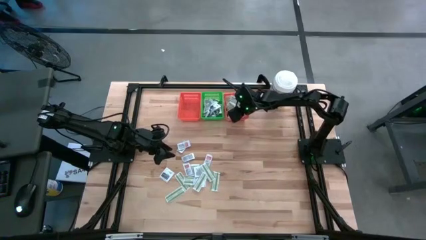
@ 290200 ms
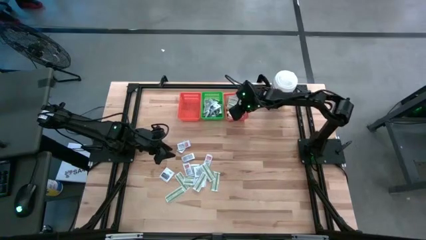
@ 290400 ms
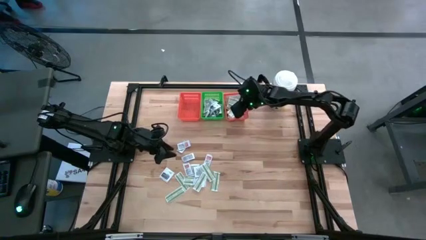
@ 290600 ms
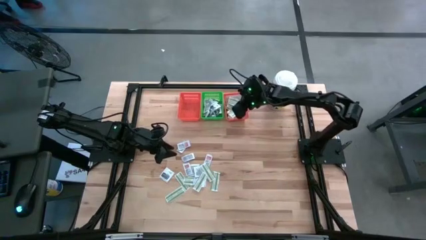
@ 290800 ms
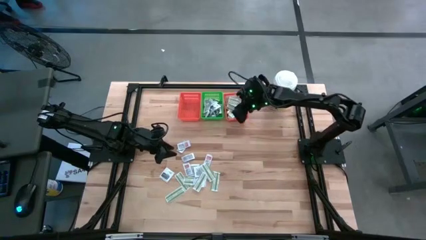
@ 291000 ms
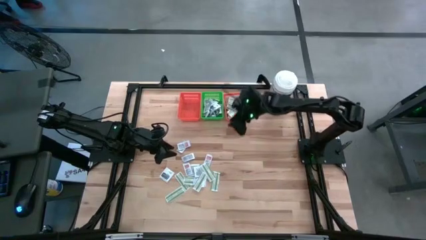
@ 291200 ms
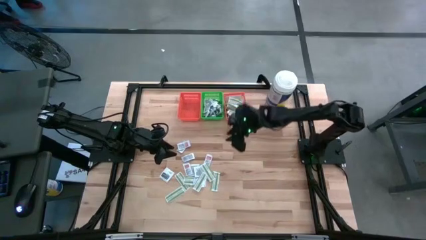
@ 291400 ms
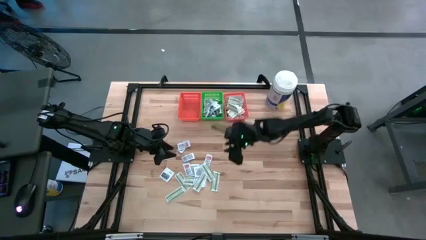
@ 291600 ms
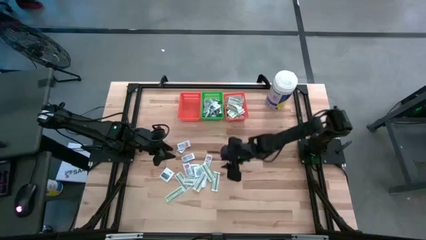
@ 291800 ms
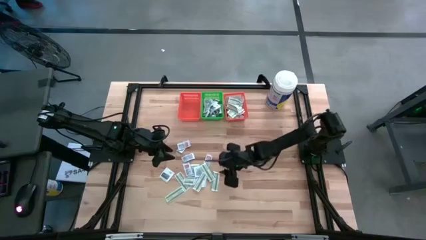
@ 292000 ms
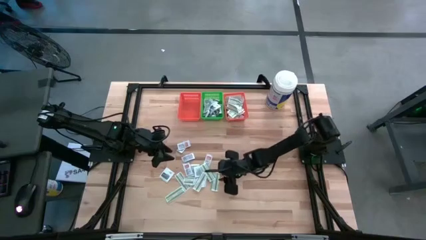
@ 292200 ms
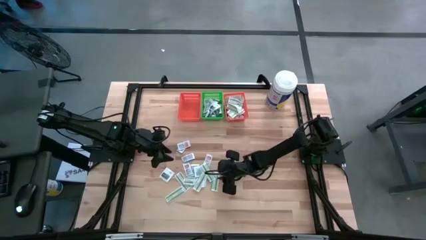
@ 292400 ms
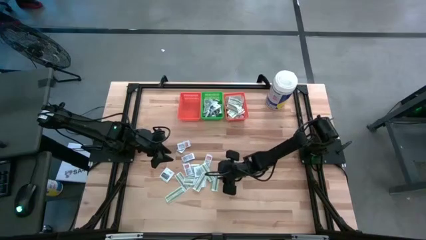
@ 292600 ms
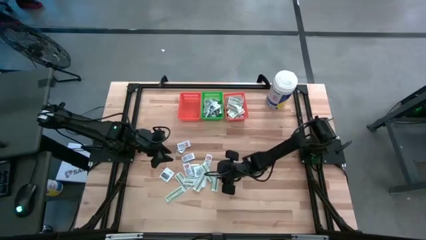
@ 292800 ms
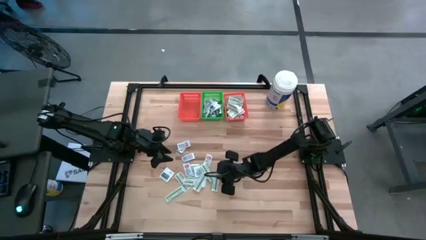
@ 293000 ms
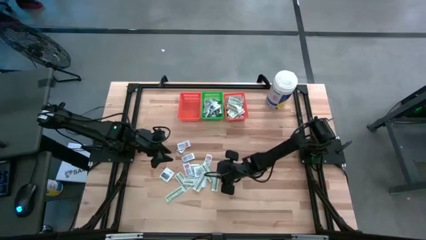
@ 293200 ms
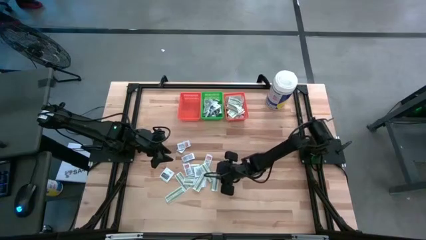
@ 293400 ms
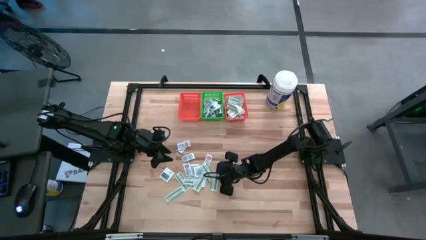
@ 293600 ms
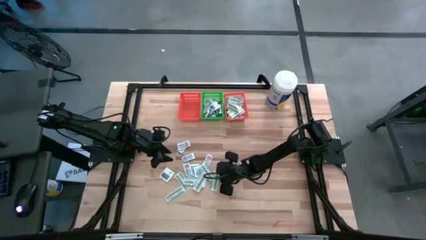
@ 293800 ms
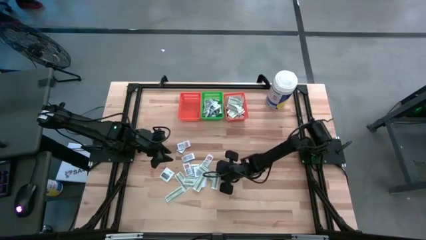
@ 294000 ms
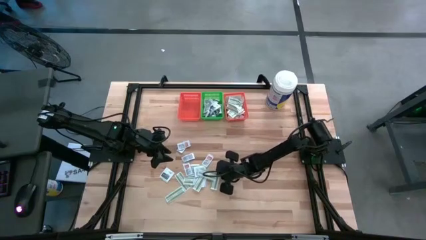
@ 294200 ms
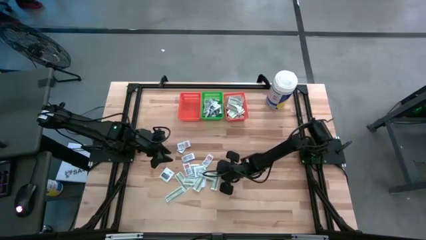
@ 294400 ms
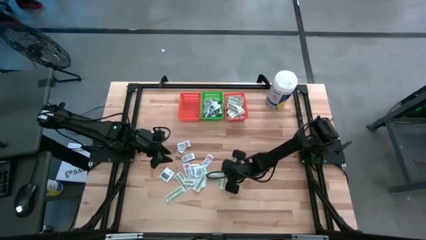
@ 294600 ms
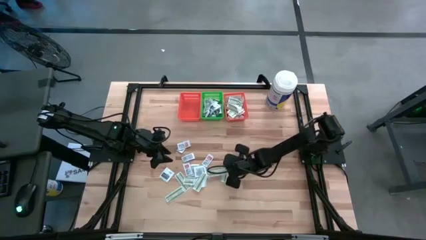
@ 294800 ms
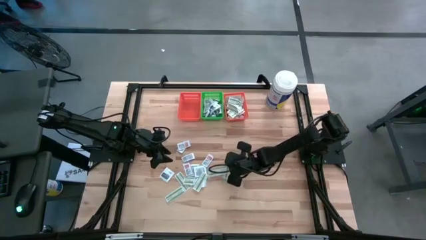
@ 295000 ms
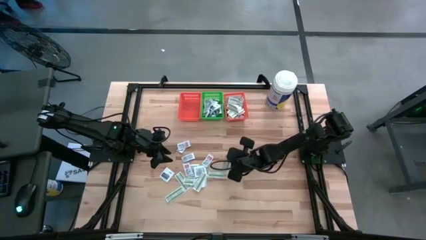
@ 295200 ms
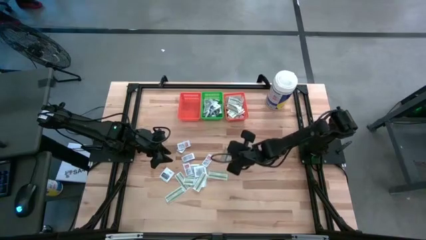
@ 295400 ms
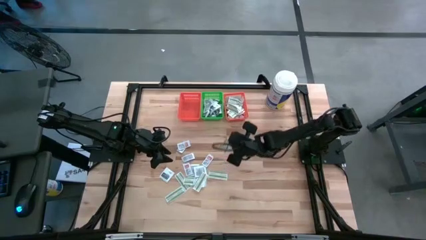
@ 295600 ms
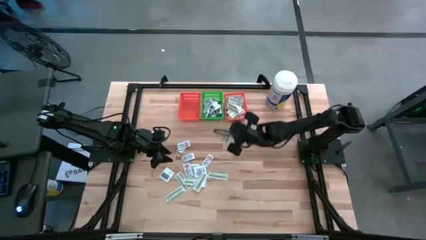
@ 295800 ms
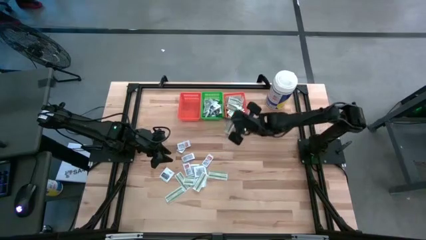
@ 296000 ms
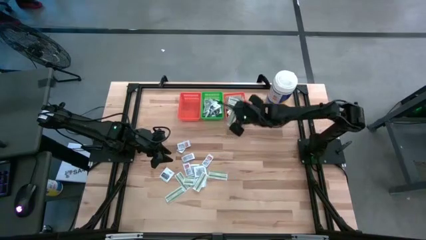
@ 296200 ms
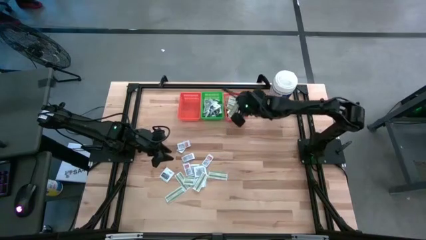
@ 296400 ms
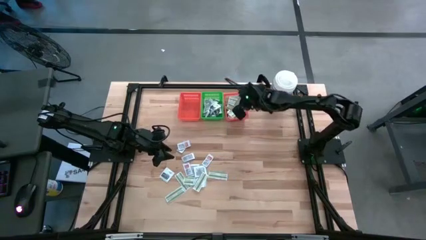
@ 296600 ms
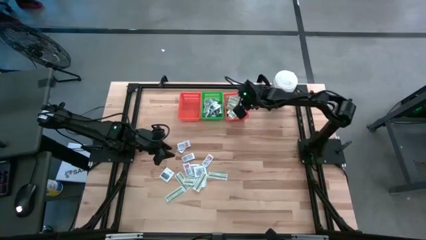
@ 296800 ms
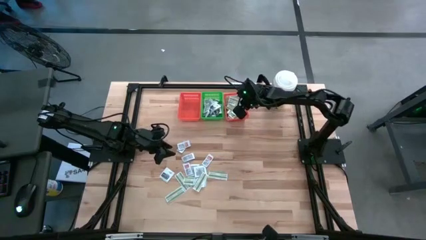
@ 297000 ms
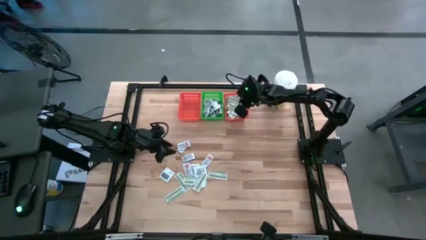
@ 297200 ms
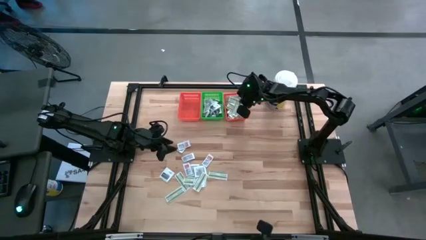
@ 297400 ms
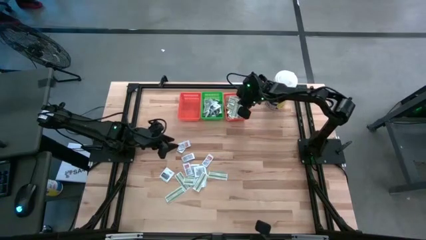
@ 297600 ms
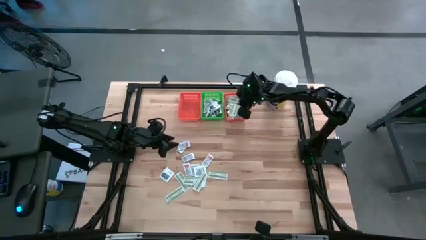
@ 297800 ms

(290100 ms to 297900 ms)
Task: Pick & Place First Aid Supplies
Put the bandage pack into the right orange bin

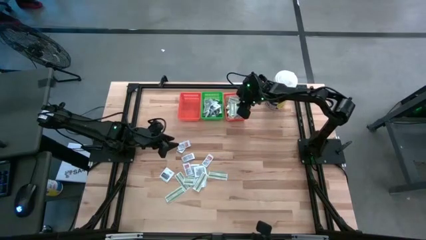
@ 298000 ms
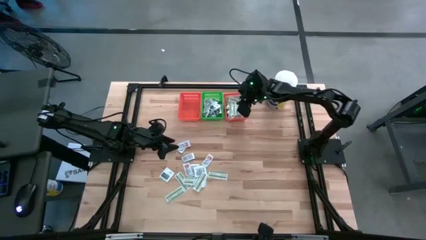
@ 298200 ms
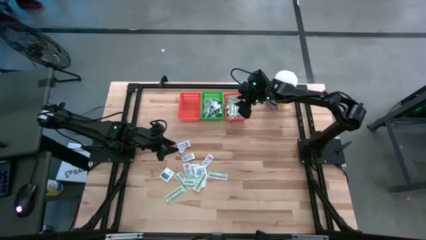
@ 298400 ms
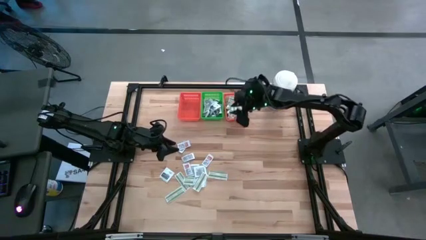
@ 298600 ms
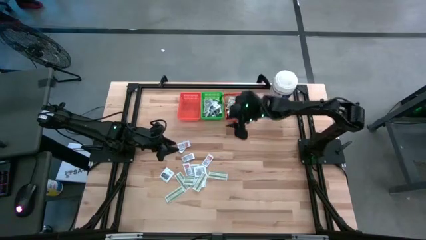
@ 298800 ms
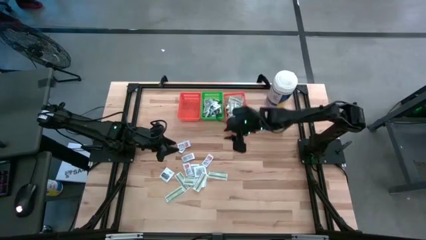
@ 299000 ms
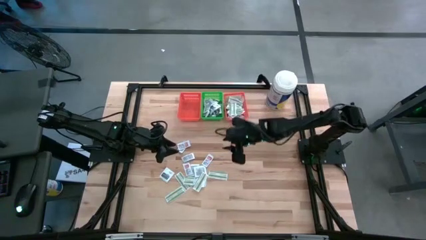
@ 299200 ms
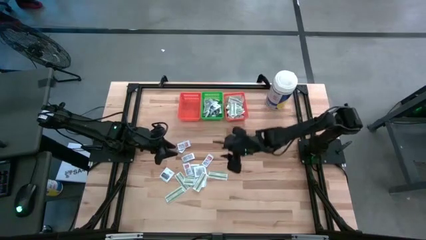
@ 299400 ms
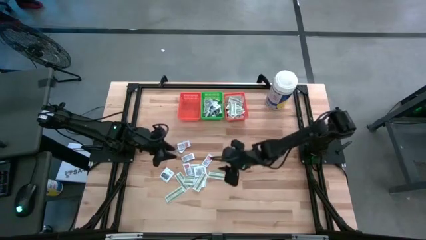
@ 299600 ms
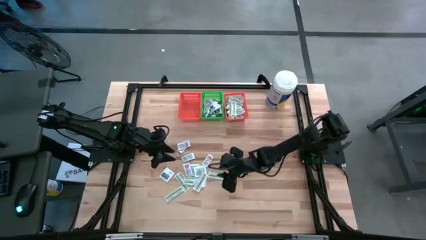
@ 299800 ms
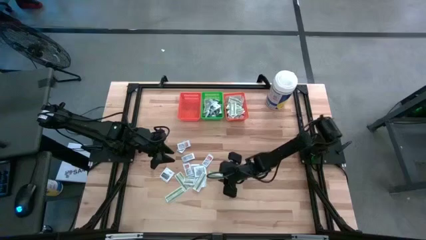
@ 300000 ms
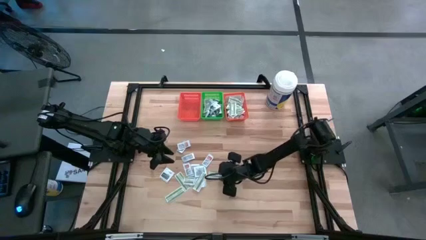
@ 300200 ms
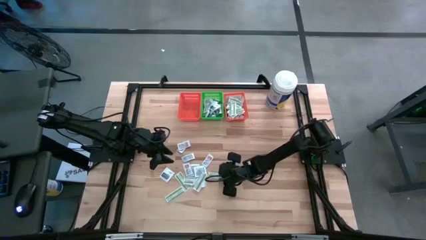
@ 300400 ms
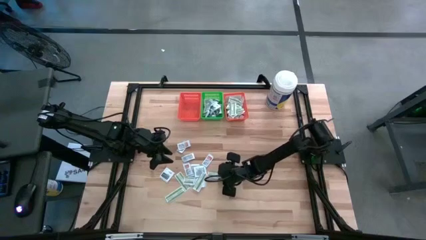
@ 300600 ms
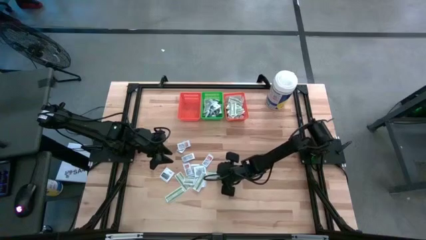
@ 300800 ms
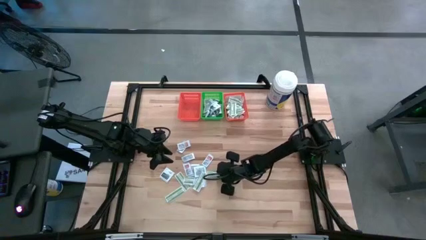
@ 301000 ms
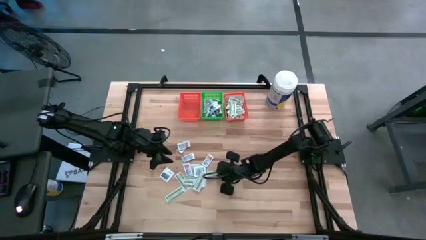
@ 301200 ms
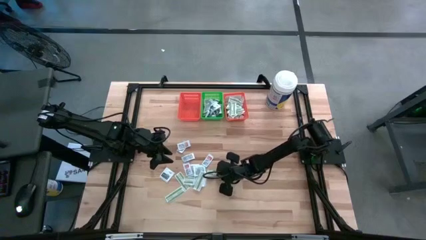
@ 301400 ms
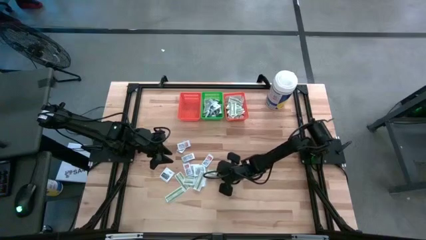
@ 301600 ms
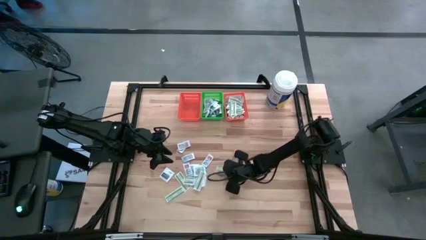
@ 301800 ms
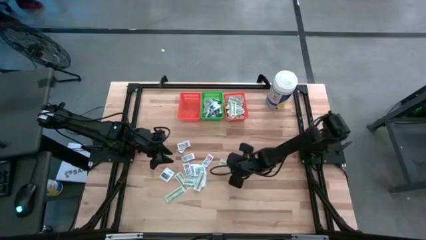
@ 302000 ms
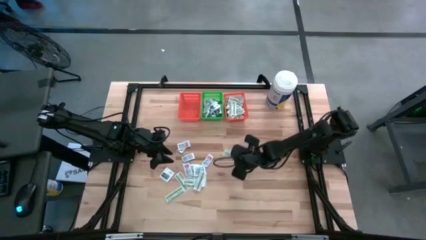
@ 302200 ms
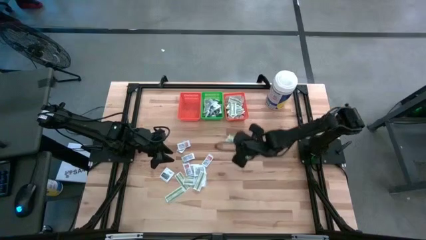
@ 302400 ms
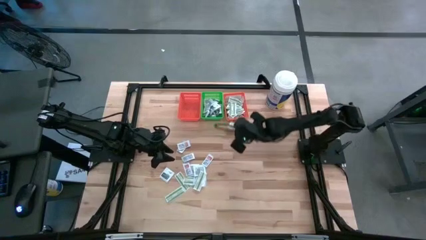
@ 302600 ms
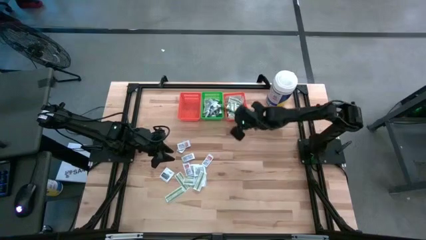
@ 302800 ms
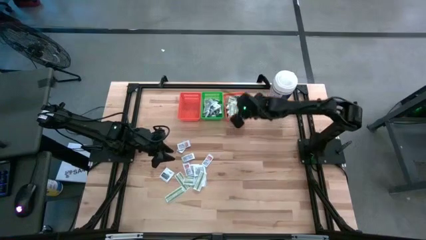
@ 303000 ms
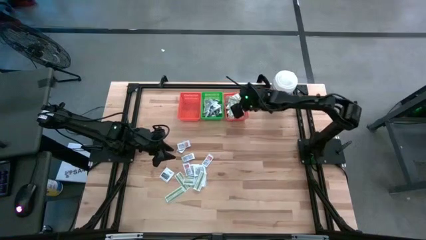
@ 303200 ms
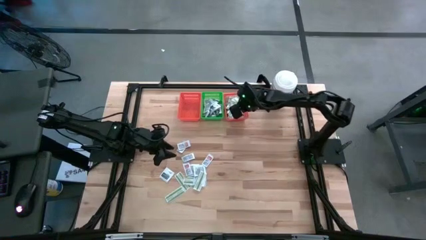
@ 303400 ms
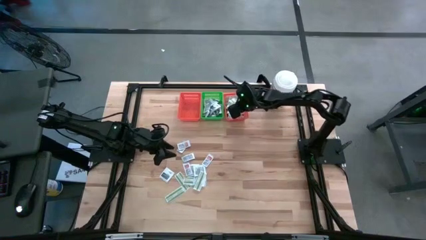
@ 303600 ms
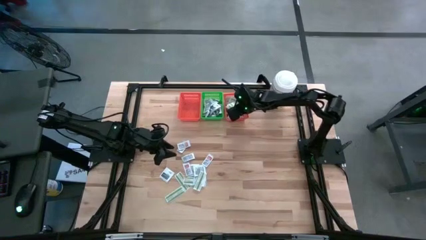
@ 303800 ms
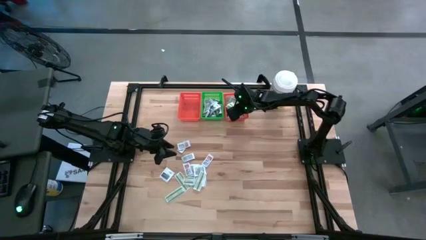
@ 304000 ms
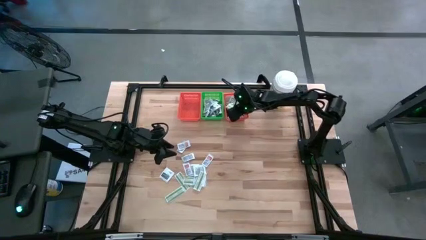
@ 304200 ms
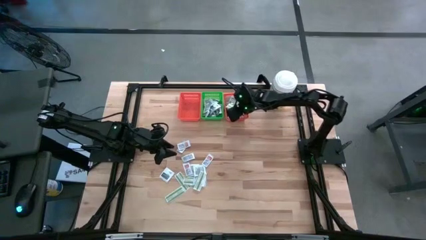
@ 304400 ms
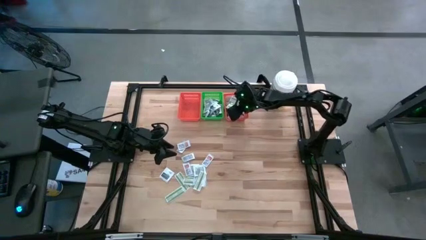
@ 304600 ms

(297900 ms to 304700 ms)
Put the bandage pack into the right orange bin
